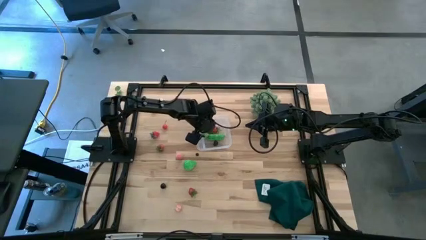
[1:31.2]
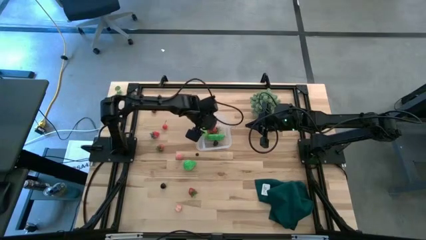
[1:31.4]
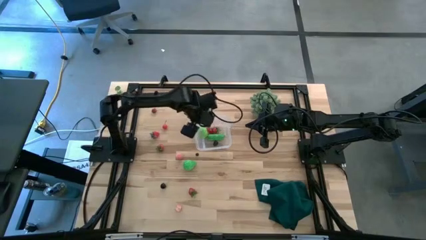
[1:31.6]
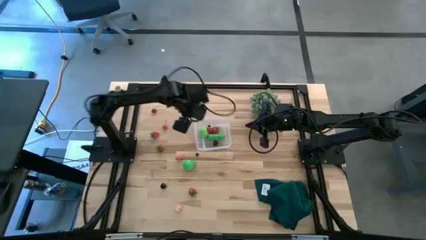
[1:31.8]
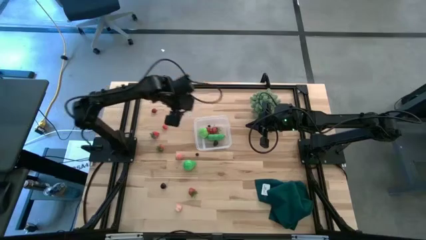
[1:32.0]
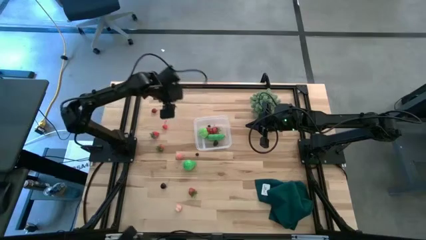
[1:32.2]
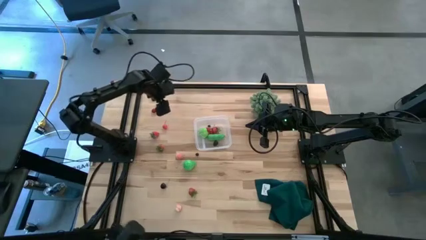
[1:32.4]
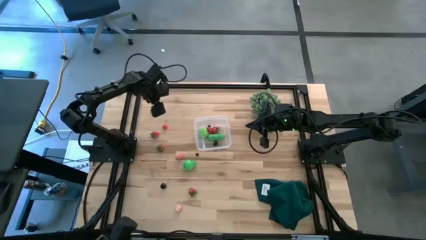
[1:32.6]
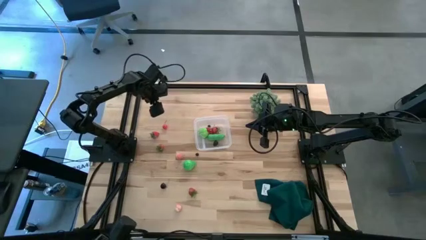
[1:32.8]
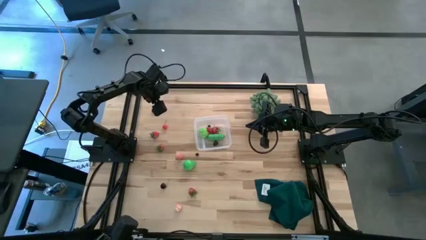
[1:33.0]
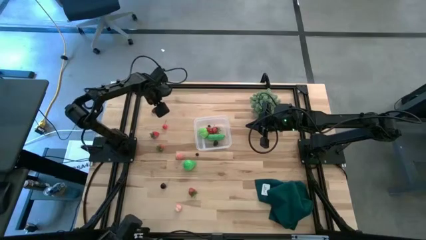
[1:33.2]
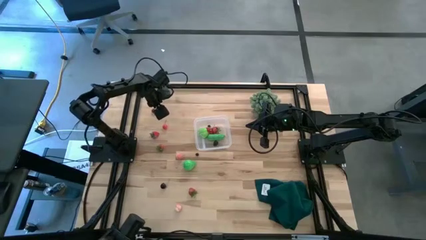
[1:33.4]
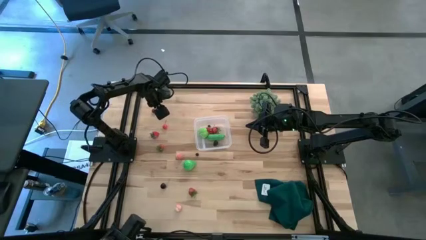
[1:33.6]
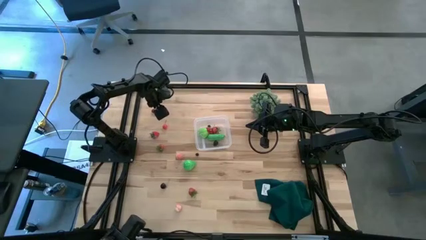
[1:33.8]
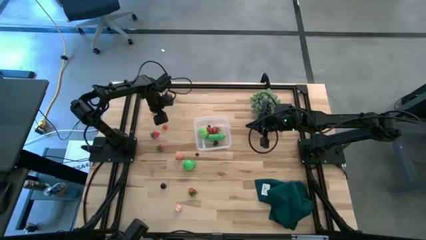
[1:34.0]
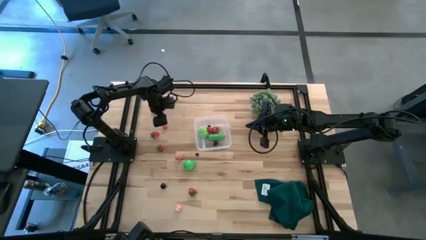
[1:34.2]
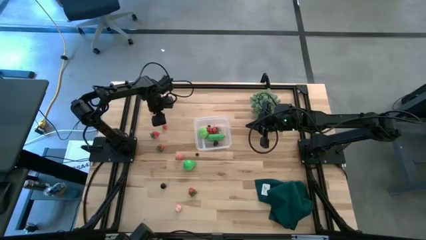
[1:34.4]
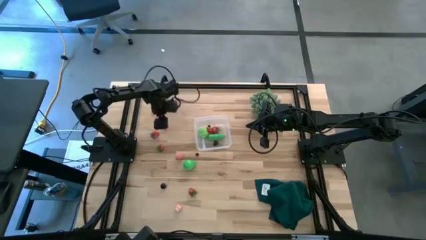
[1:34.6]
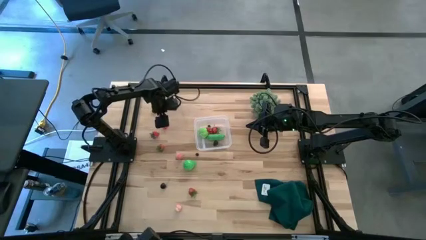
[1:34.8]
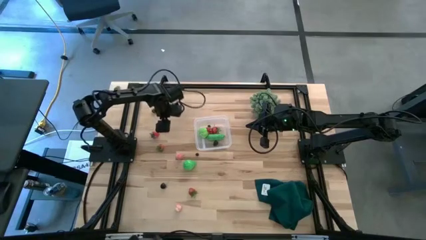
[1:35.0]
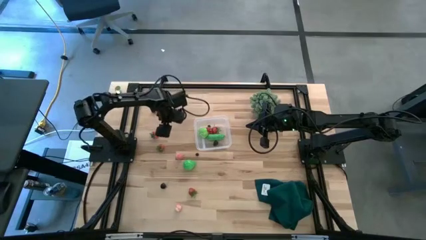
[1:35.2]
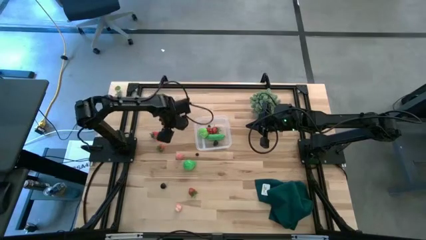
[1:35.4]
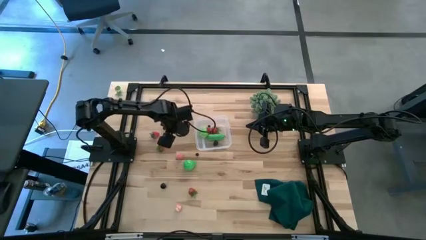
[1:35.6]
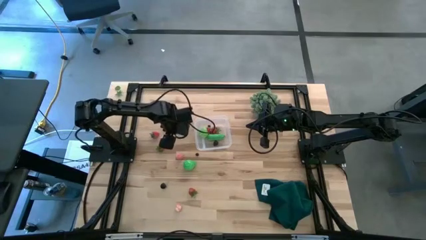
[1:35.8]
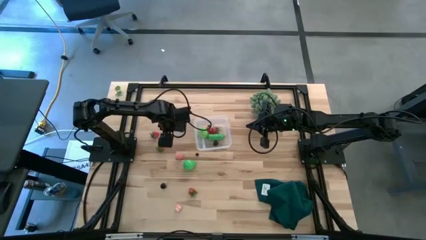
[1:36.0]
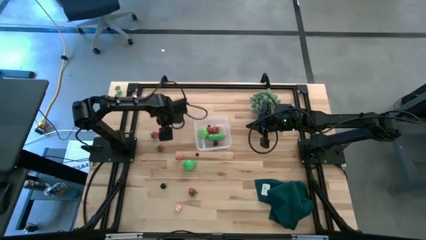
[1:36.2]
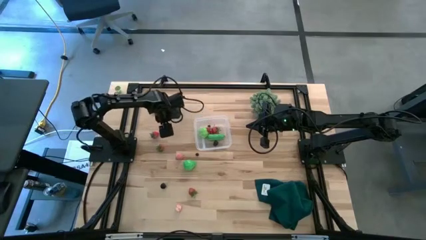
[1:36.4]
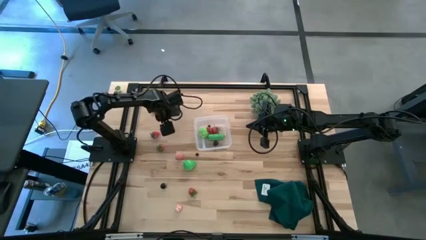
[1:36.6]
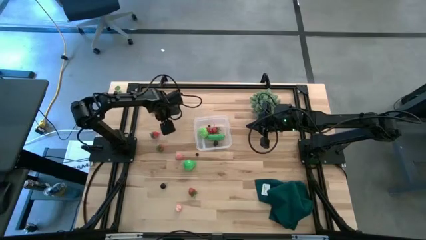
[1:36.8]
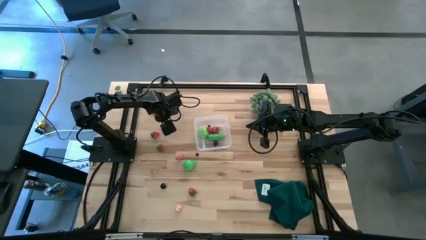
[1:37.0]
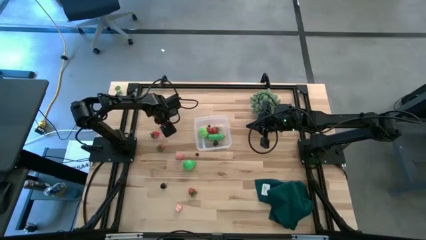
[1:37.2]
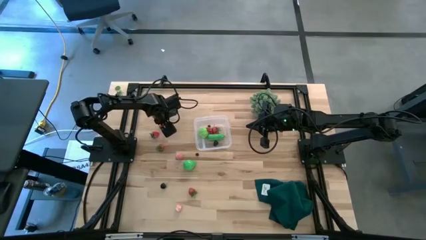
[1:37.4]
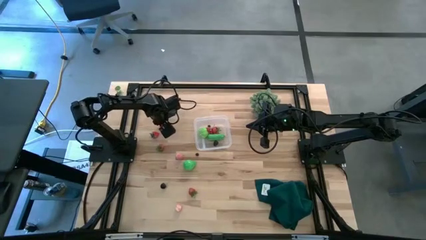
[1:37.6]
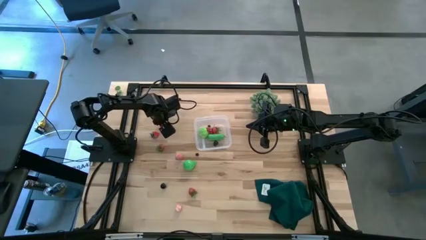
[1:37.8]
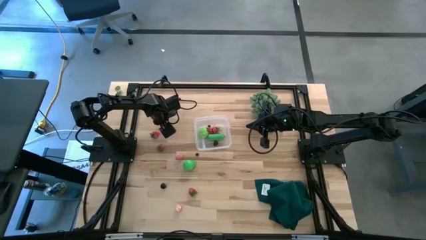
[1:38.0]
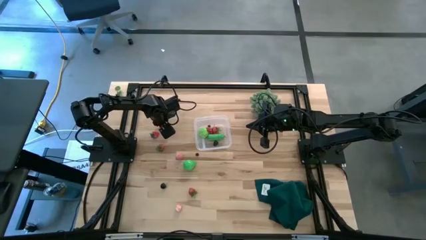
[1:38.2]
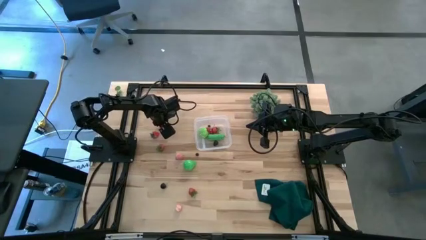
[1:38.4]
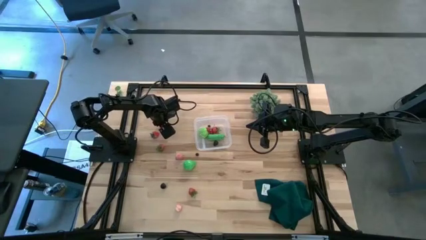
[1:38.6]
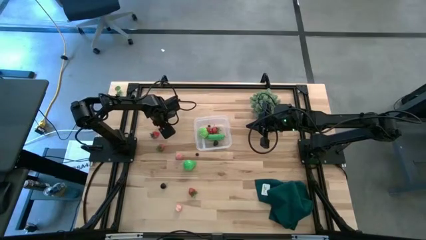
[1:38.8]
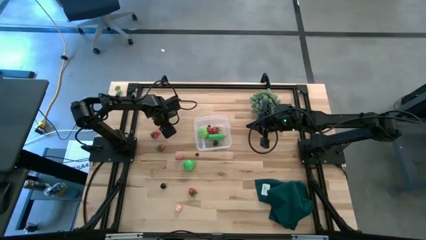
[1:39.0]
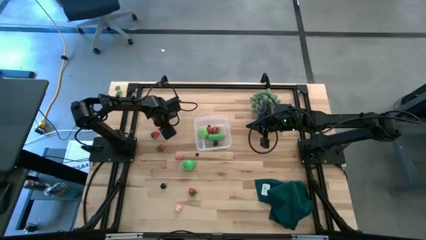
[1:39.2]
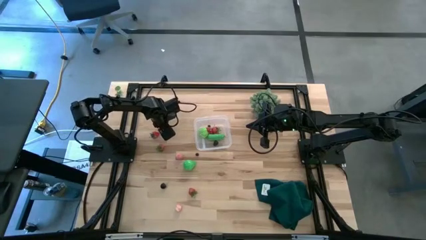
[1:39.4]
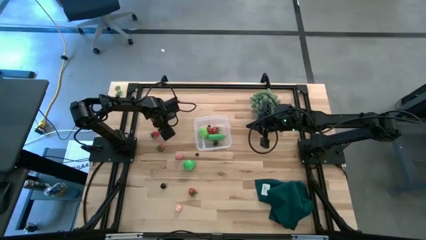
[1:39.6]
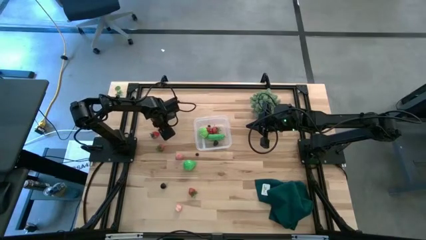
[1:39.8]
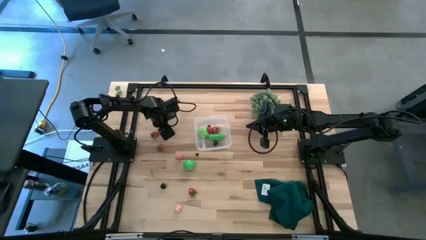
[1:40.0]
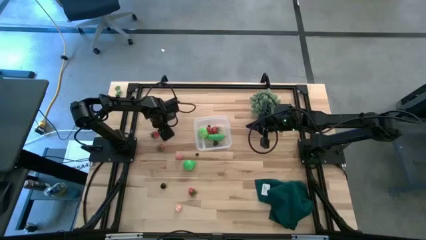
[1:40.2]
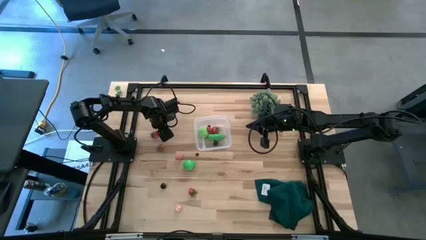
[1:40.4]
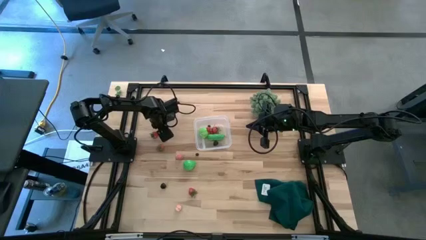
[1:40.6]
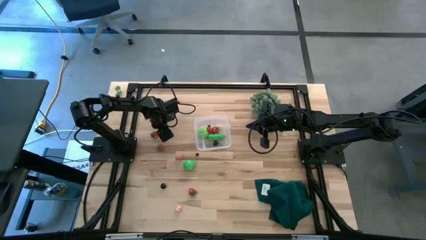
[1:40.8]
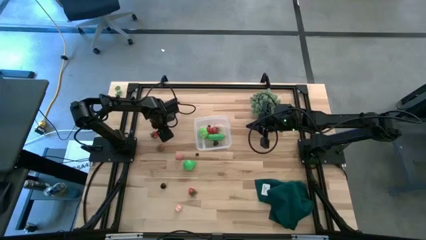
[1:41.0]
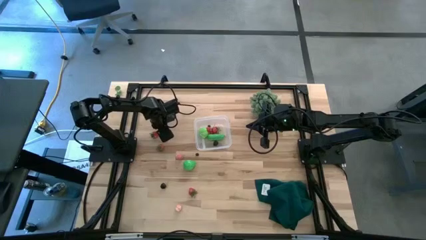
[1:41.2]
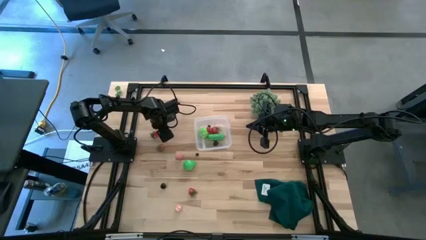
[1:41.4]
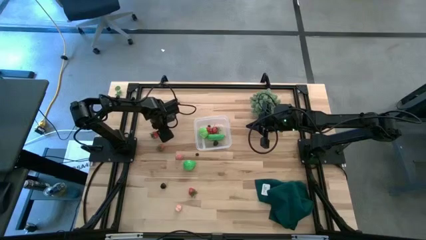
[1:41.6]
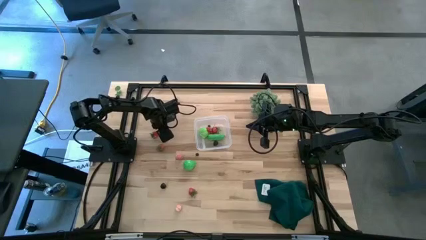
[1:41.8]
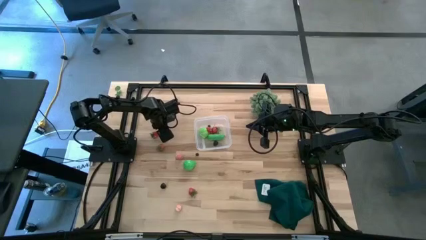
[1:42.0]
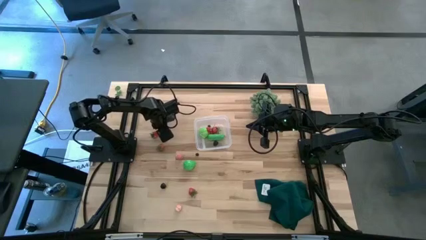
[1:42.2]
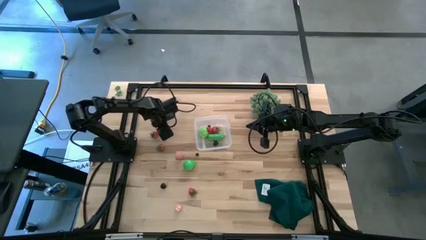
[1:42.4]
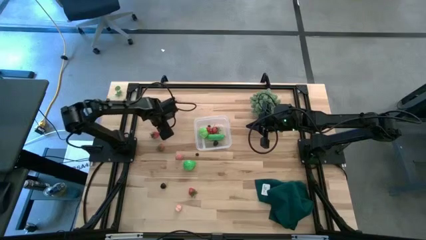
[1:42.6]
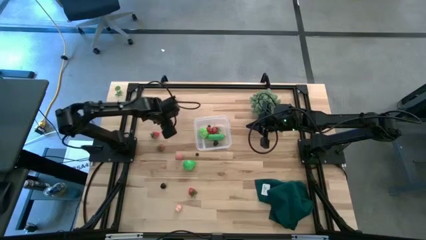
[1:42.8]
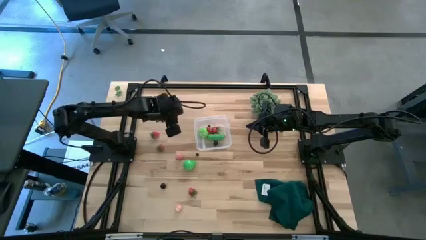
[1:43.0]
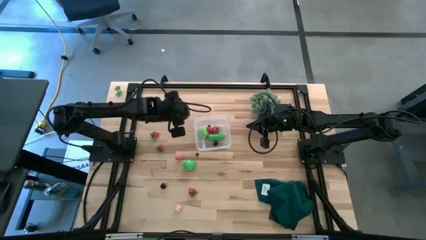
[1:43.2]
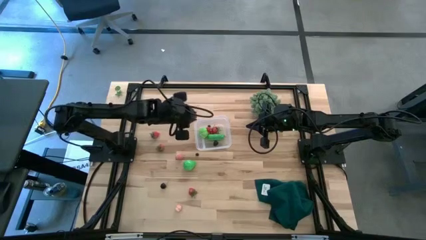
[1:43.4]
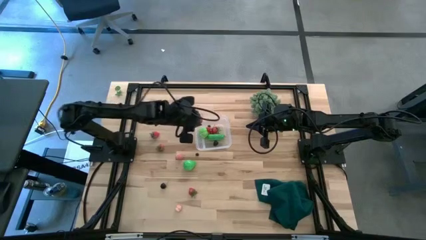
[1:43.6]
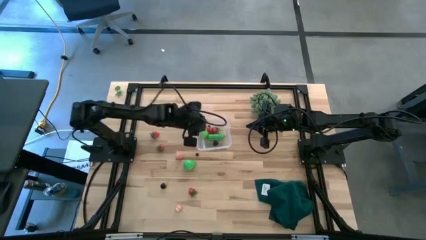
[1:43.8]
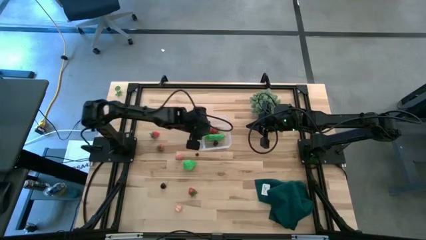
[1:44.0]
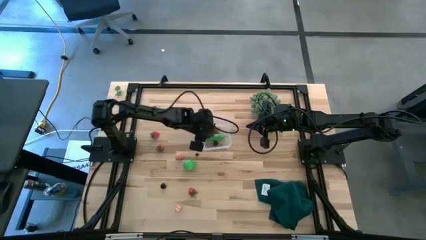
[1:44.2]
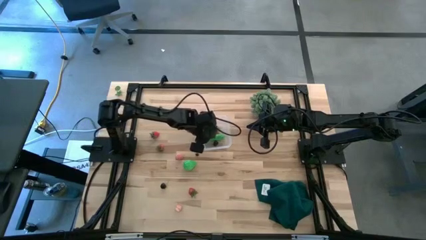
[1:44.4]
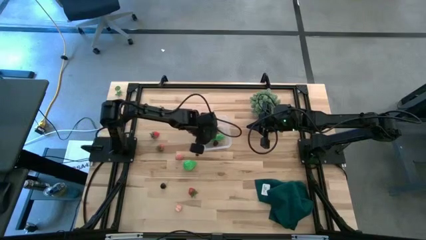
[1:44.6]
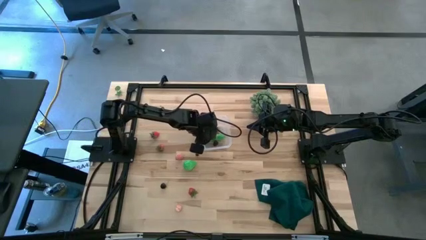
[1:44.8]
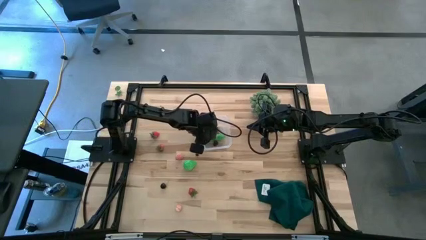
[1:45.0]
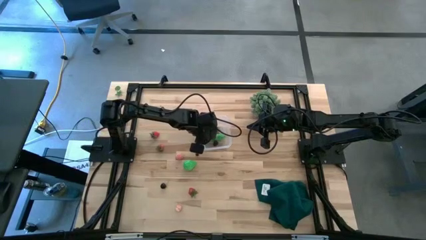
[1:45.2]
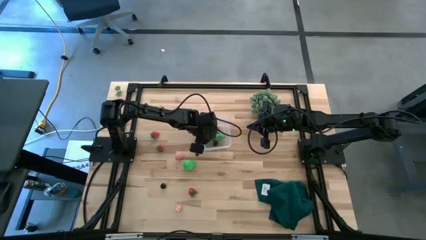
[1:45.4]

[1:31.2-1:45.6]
Task: Pick and placing Produce into tupperware
Put the red cherry into the transparent bin

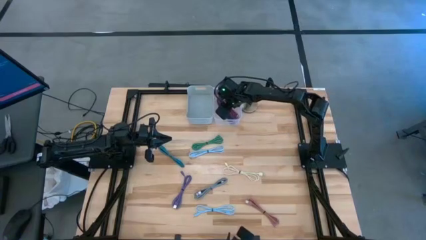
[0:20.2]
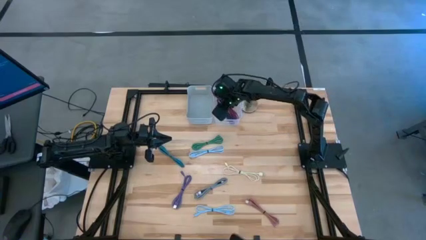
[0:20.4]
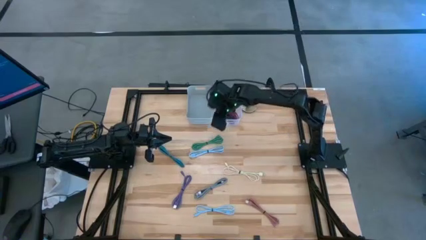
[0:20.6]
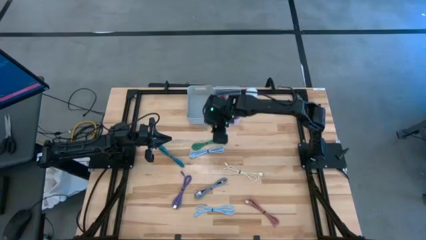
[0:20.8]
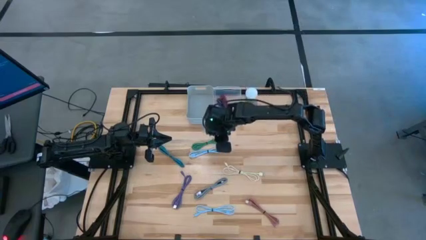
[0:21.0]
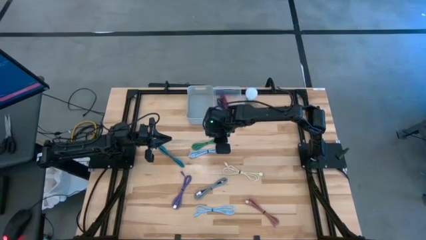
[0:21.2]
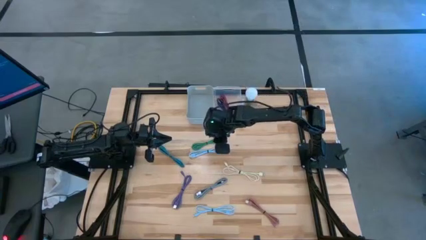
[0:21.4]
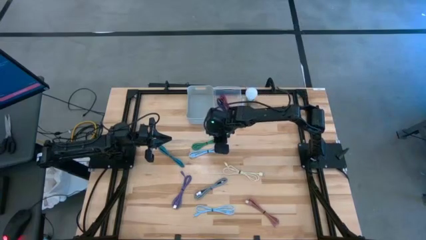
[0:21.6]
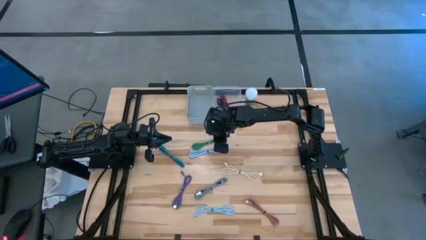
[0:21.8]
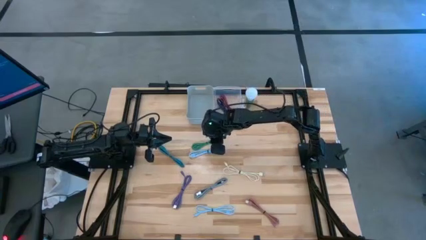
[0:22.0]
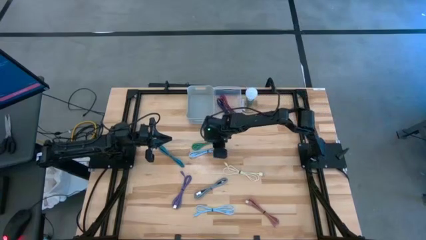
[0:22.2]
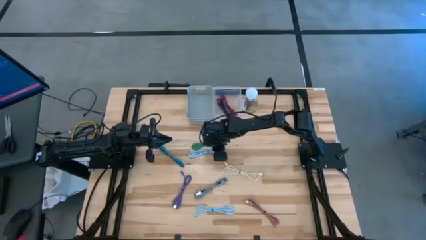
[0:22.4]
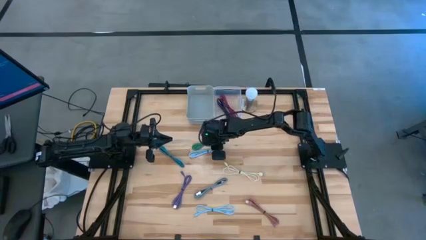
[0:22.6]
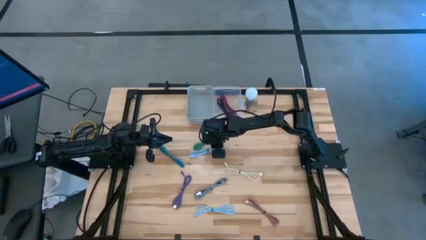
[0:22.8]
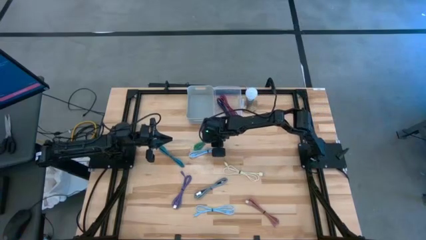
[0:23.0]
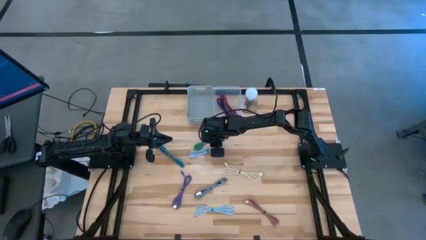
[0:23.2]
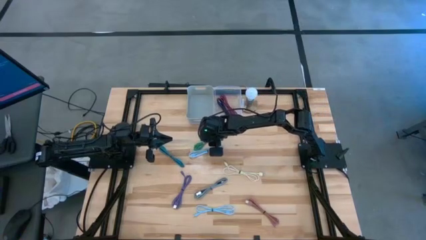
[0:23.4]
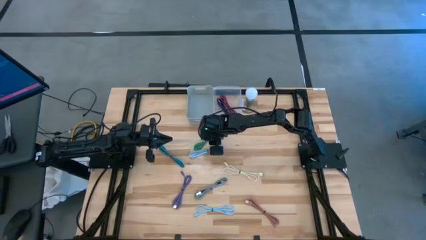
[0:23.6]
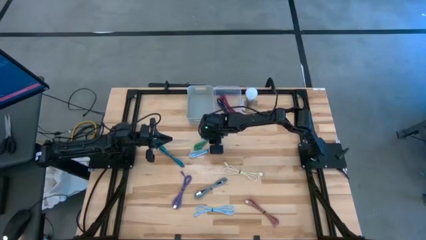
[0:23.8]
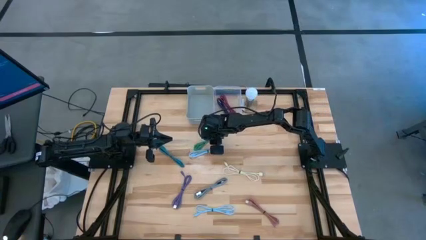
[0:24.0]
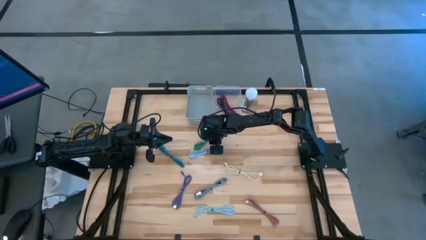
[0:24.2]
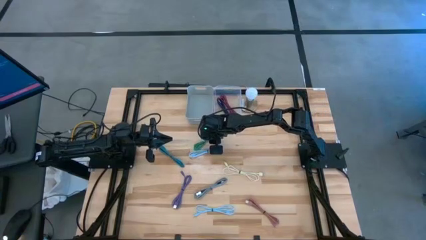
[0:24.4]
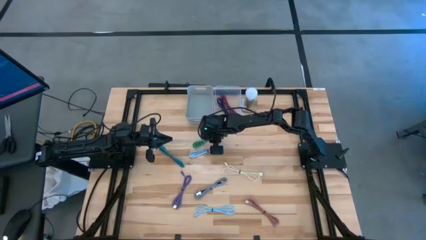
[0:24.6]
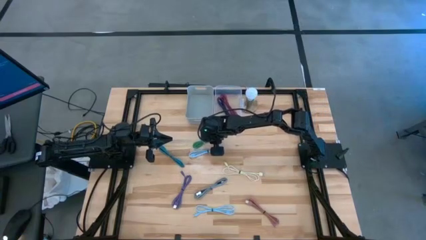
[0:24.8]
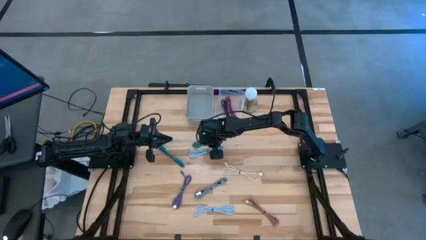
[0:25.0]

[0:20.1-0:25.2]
Task: Pick & Place USB Port
Put the green charger cable into the white bin
